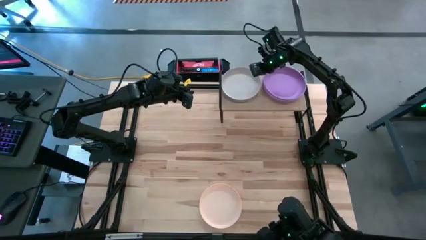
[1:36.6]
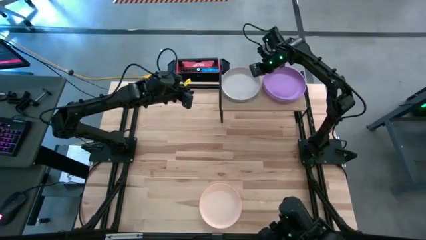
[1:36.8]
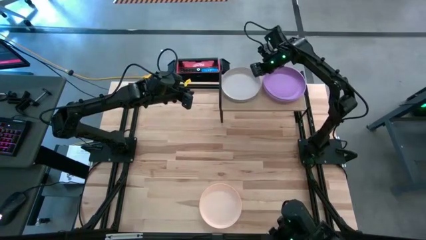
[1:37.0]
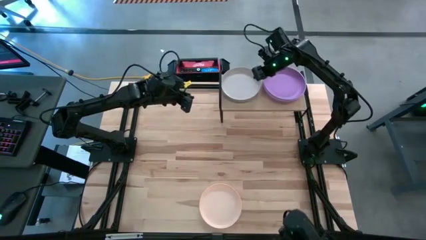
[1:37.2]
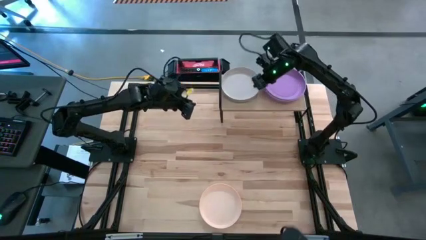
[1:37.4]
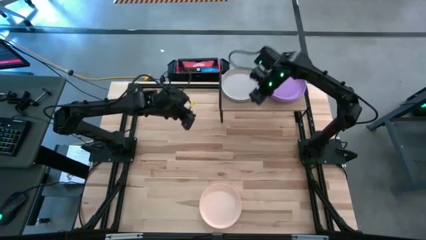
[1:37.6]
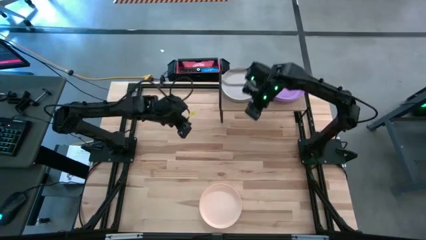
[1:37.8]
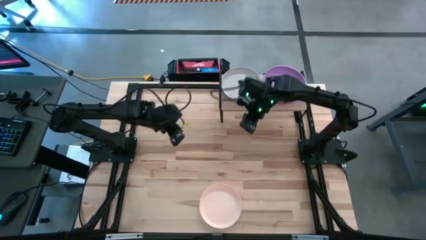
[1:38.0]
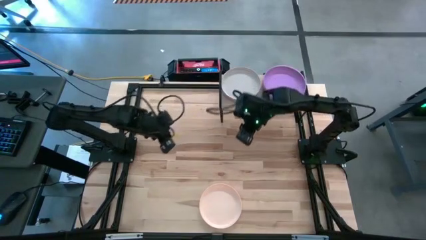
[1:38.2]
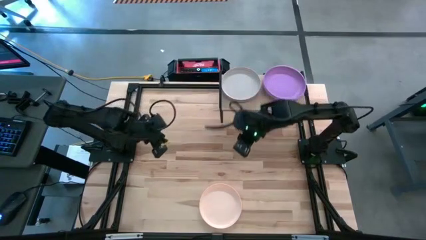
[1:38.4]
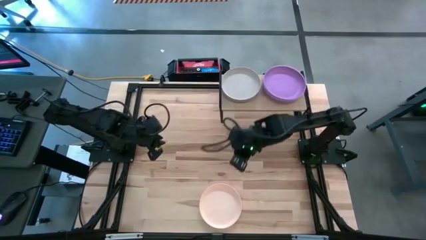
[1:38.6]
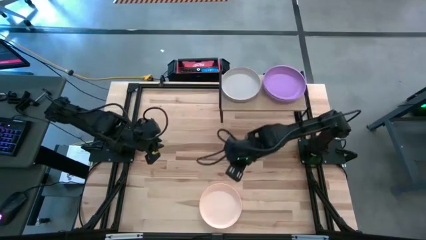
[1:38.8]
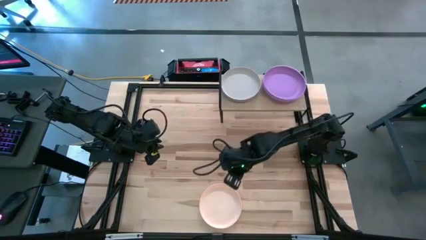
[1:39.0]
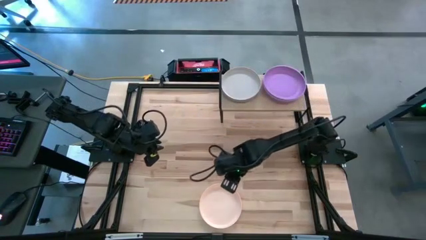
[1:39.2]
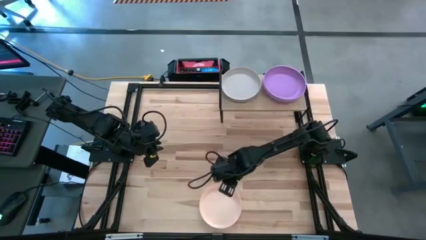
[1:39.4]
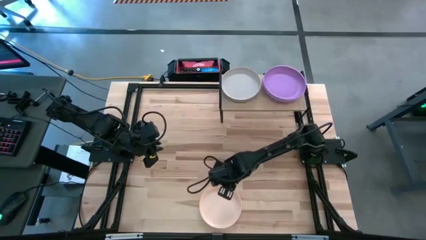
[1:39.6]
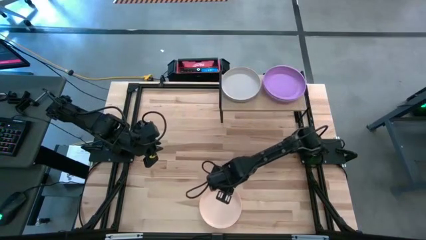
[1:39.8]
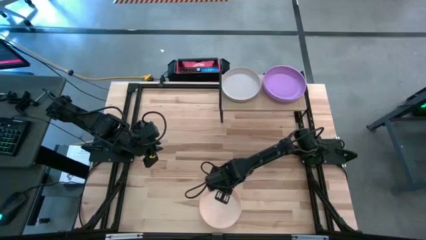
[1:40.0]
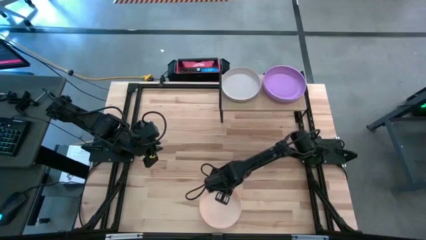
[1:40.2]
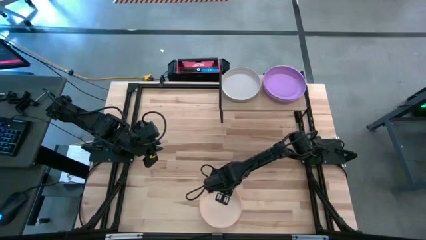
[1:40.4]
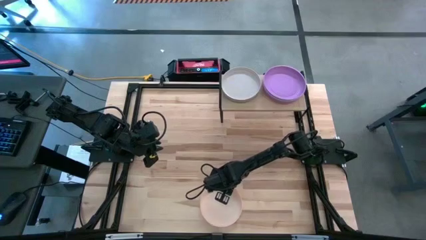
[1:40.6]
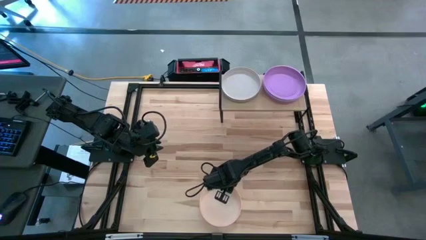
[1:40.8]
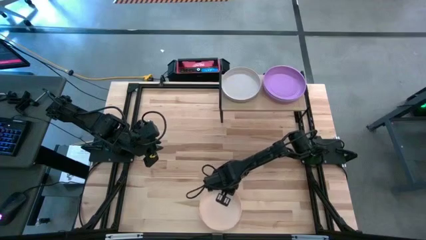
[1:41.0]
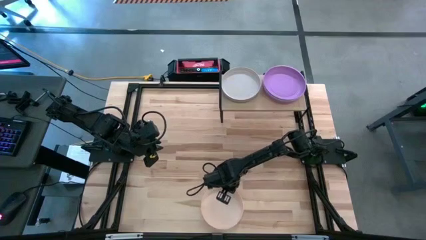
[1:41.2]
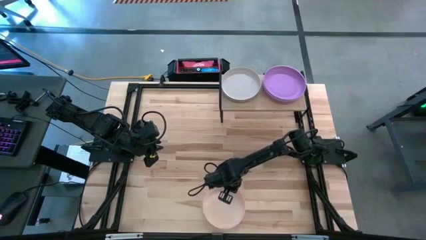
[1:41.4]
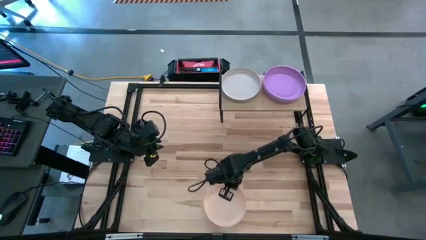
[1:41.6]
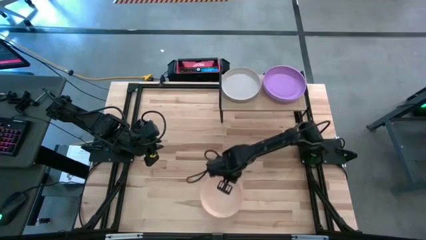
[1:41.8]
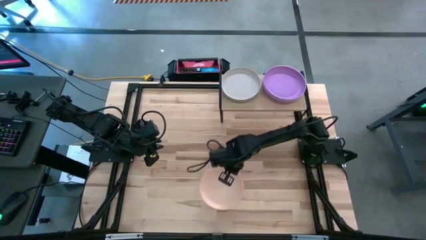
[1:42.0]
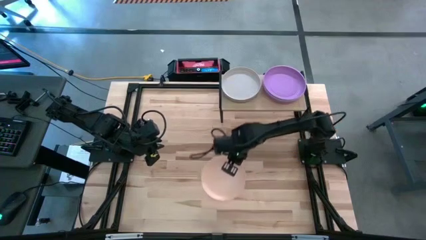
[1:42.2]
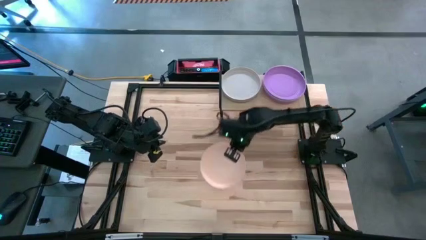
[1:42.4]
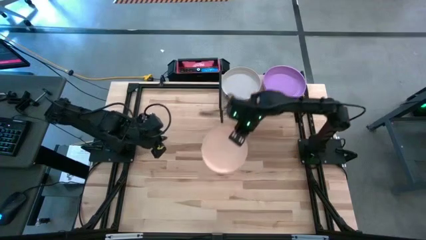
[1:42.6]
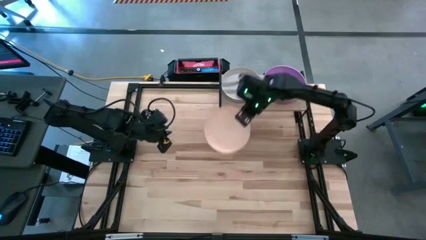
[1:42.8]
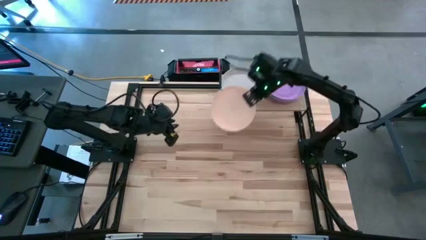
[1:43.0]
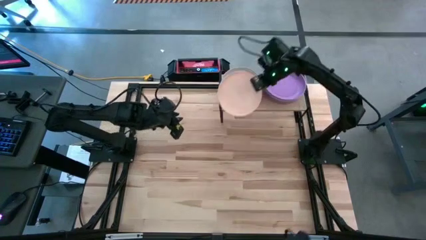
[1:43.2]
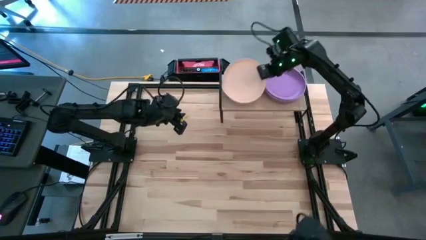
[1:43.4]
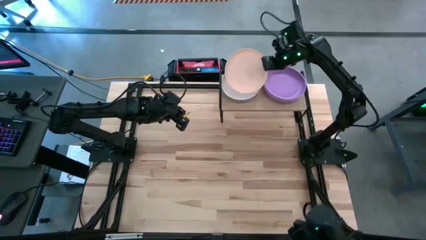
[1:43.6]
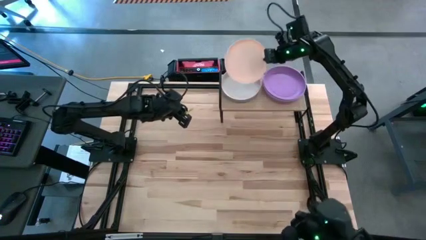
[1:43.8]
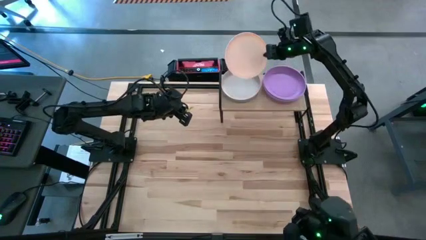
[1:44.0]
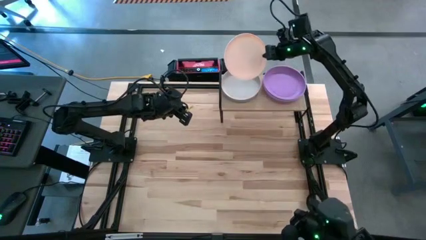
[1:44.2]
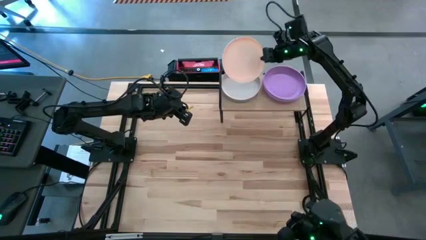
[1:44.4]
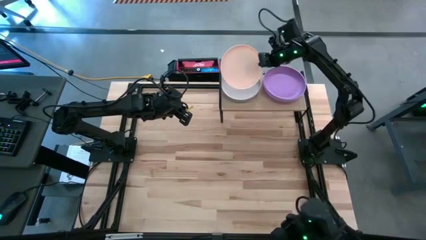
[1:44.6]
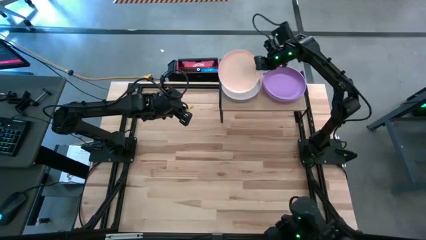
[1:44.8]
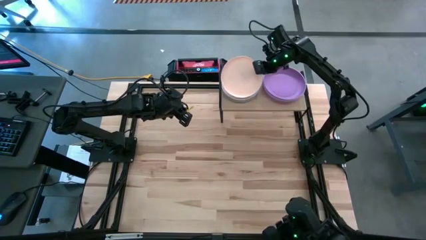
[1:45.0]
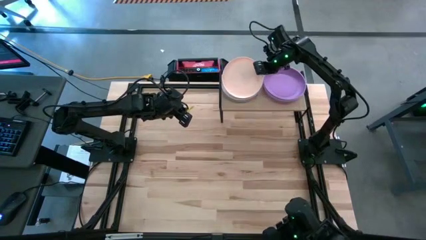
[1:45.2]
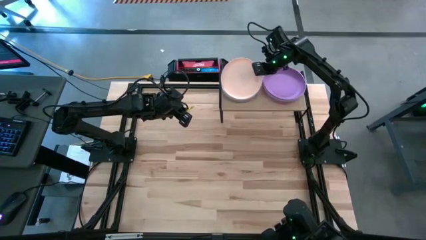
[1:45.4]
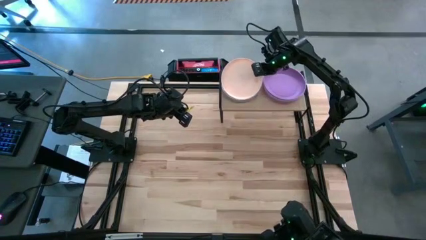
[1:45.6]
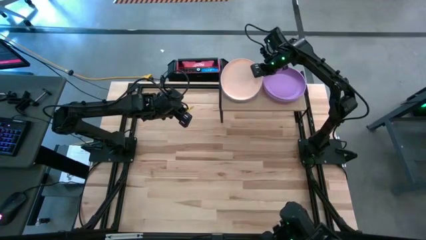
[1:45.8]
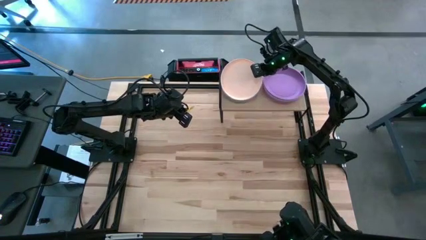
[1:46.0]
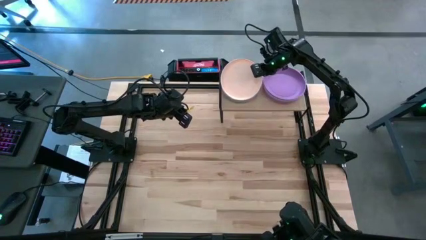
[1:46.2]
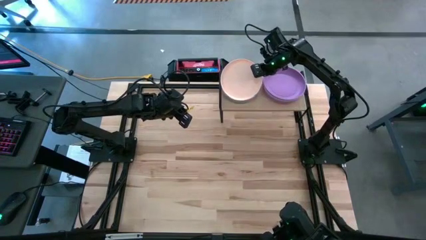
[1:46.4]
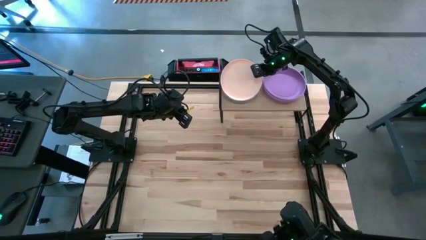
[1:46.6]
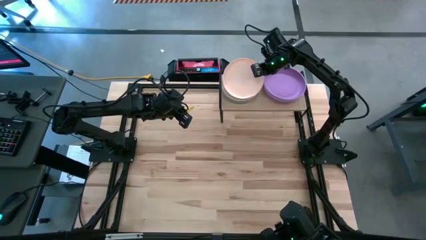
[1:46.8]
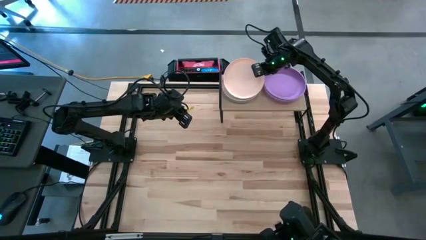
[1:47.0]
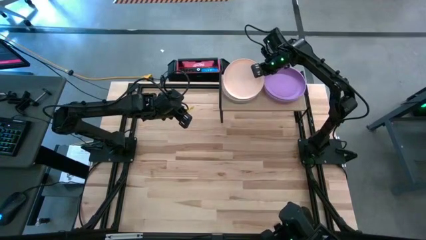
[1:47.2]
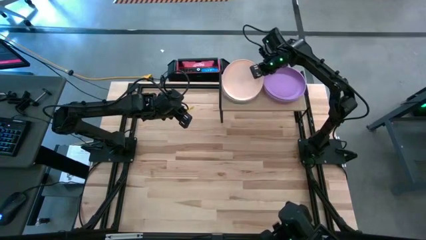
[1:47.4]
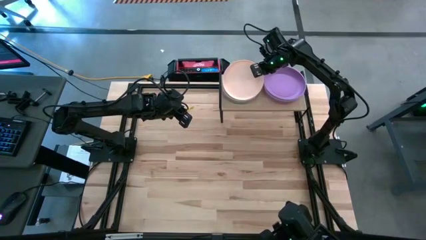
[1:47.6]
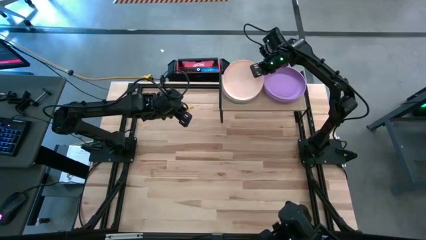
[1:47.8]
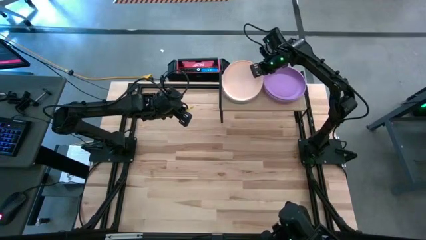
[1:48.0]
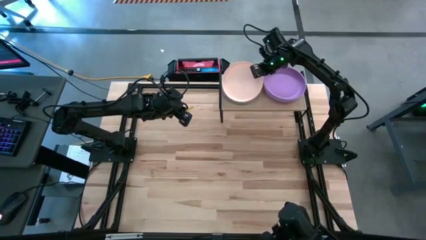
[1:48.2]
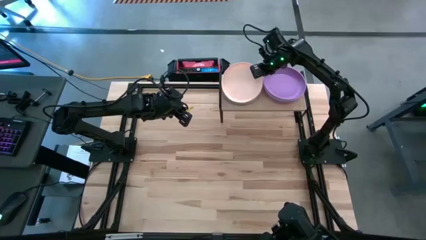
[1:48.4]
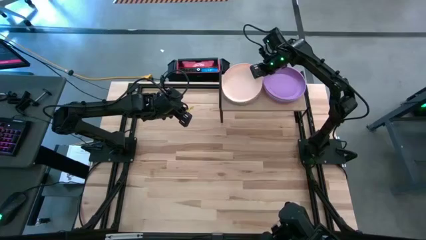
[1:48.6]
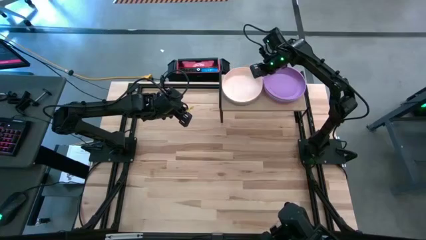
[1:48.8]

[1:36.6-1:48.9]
Task: Place and stack plates onto a shelf
Stack the light orange plate on top of the gray plate on the shelf

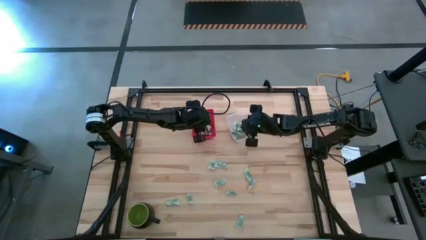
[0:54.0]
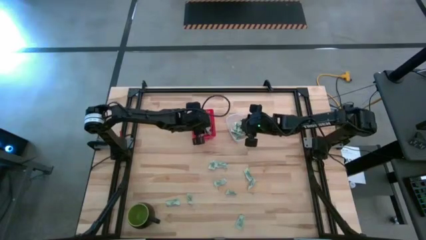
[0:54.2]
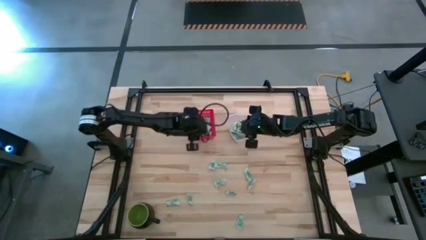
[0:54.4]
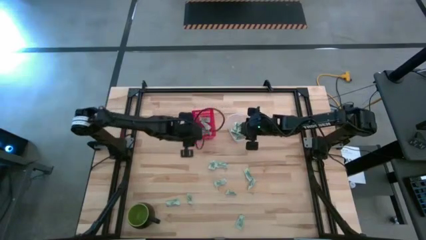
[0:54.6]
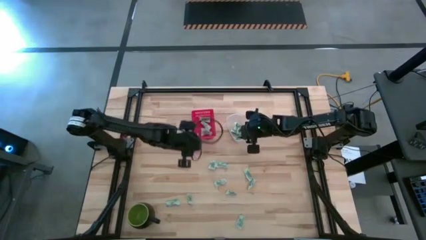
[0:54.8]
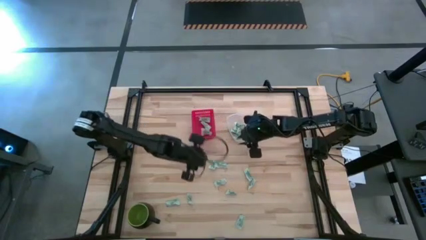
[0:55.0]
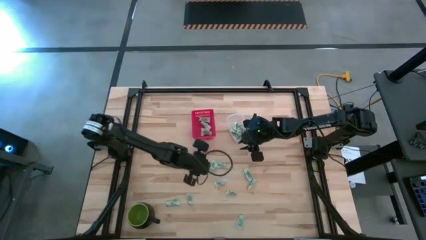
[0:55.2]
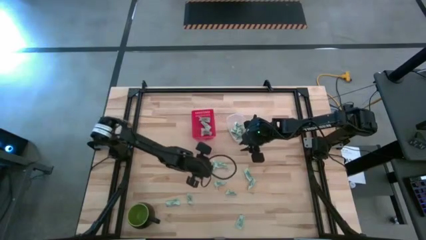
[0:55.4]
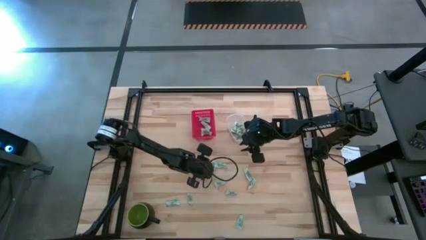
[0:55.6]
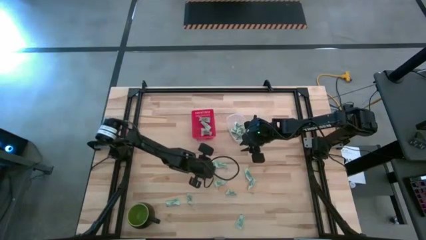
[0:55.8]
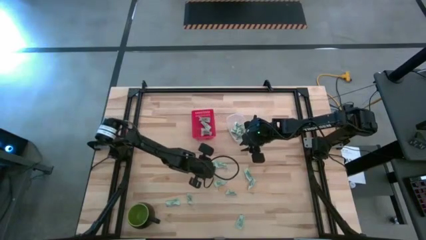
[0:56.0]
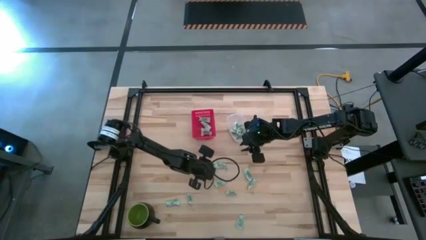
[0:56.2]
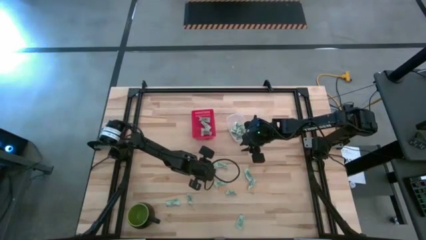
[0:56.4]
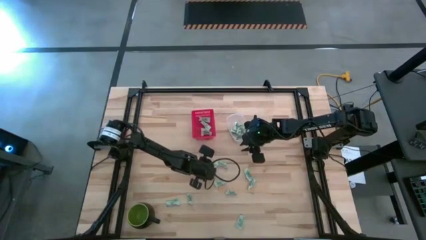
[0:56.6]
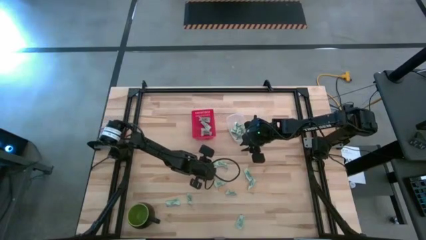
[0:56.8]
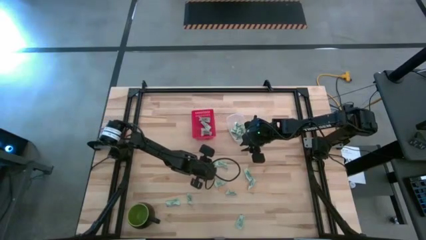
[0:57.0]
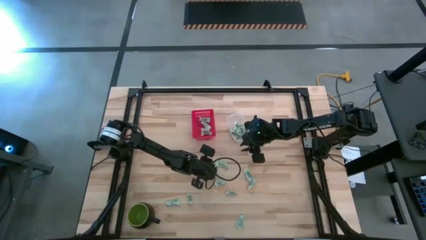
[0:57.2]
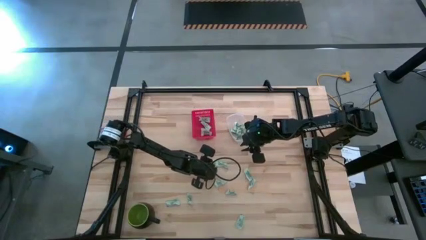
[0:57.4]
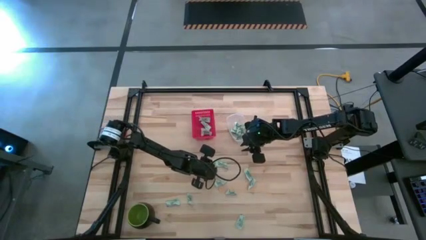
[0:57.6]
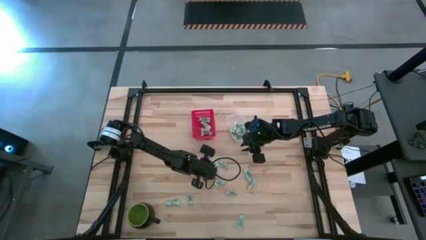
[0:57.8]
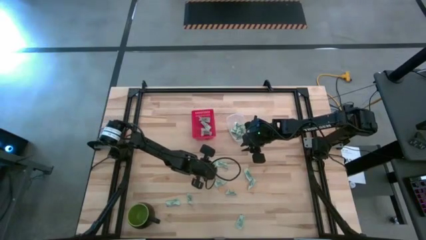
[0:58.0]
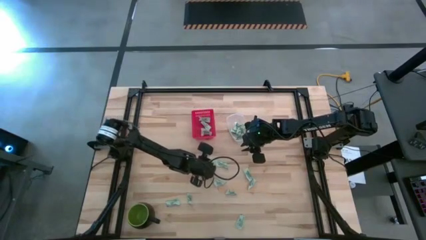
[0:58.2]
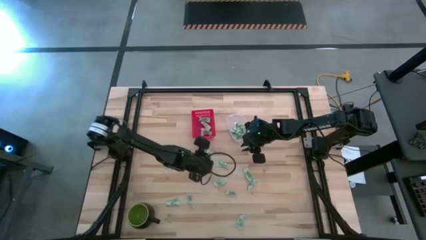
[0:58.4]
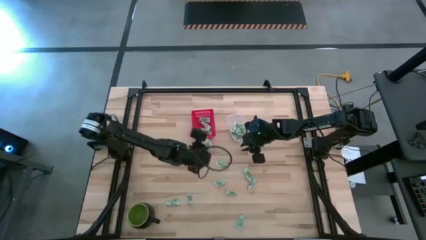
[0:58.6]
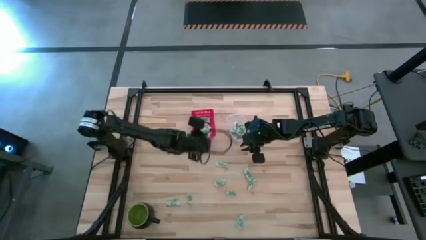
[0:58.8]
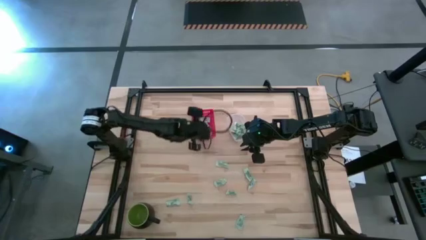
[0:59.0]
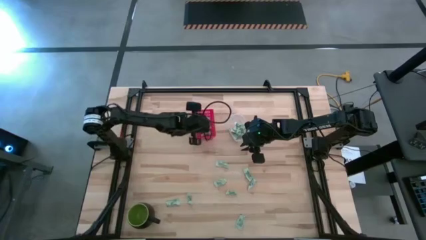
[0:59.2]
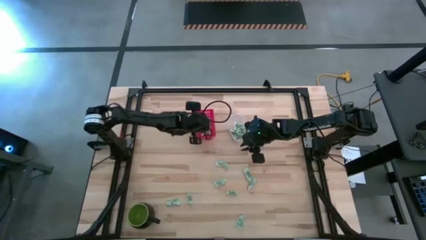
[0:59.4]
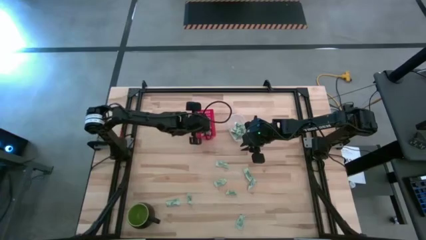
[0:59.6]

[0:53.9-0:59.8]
Task: Pick and place items into bin
Put the white stevia packet into the red bin
